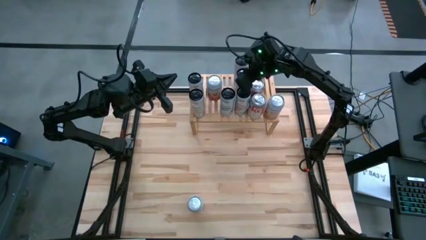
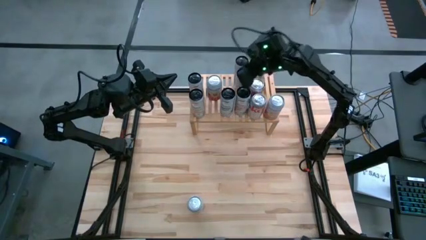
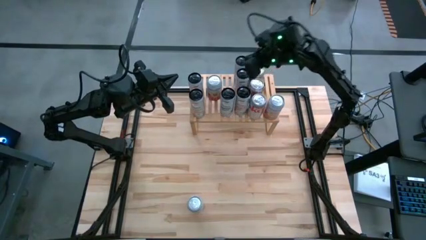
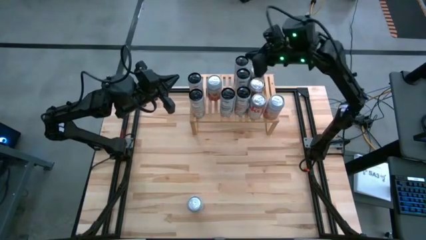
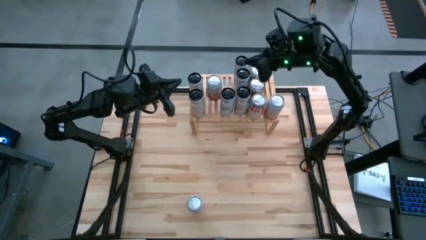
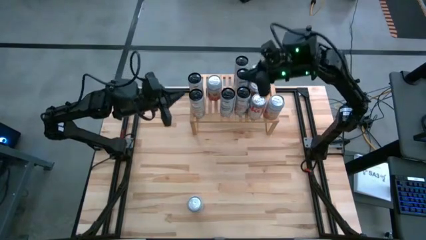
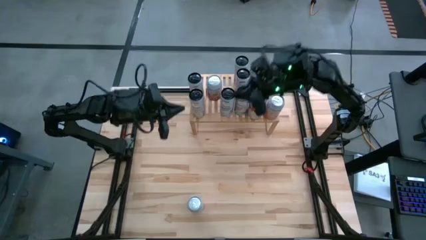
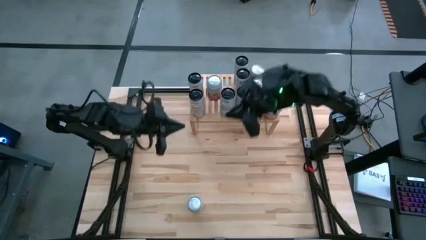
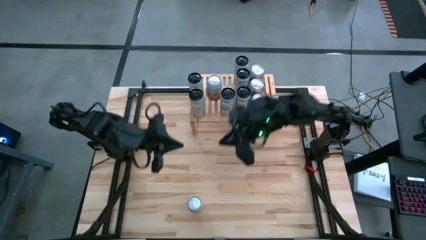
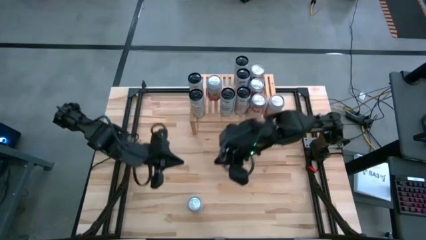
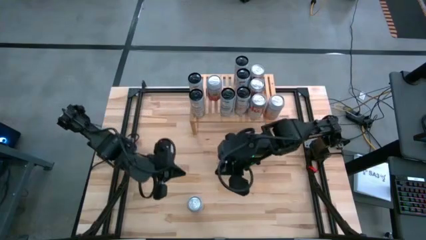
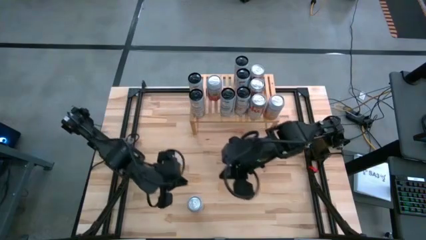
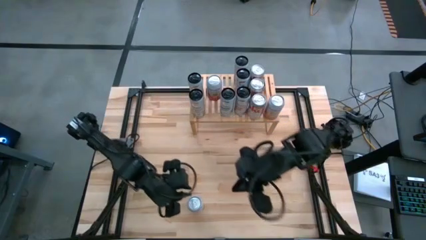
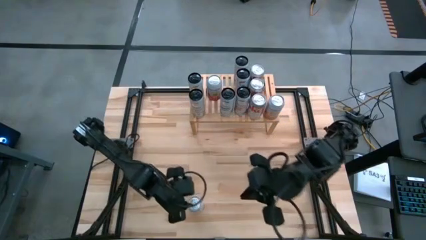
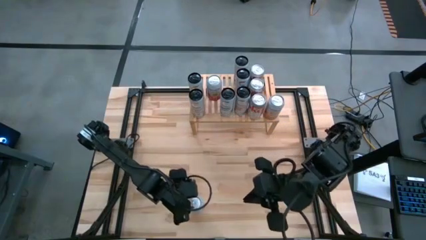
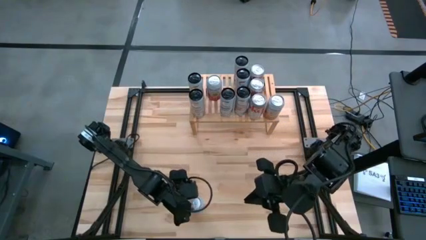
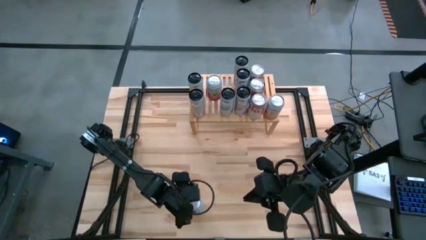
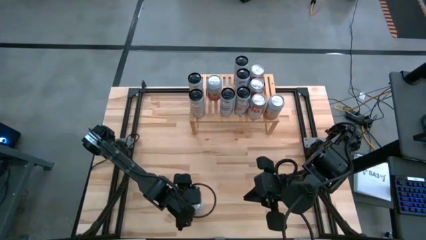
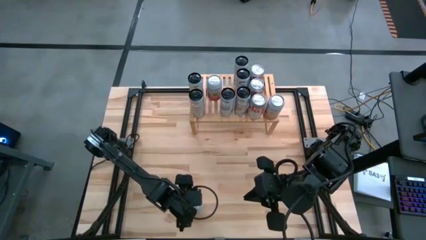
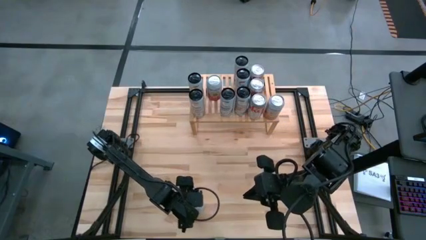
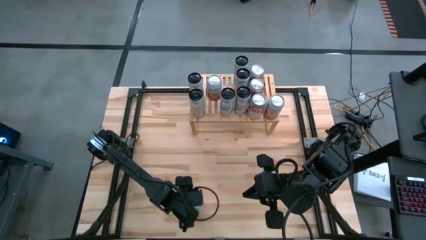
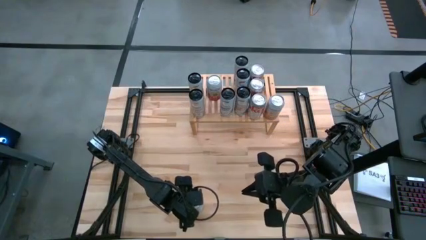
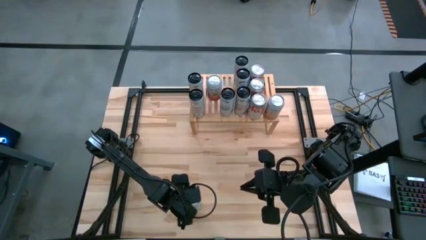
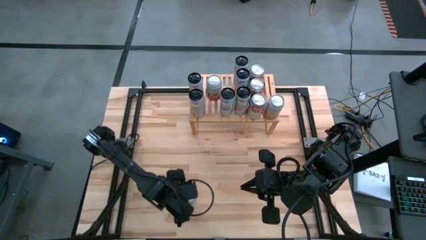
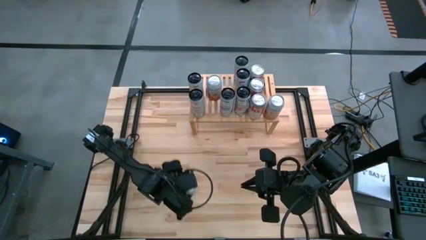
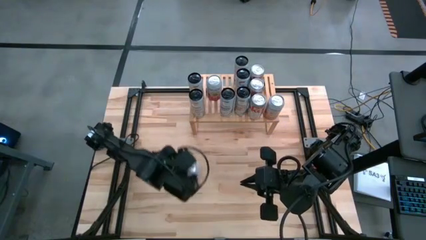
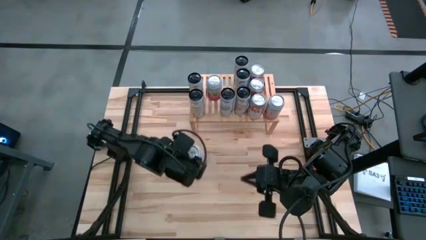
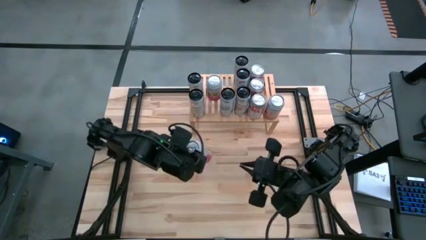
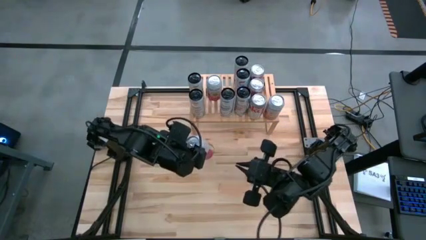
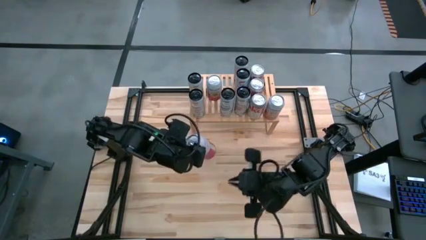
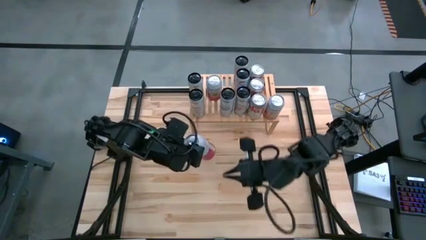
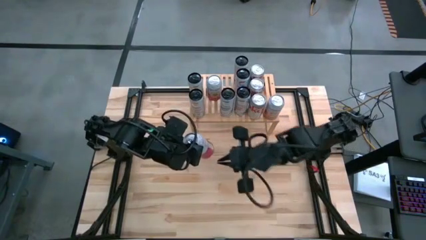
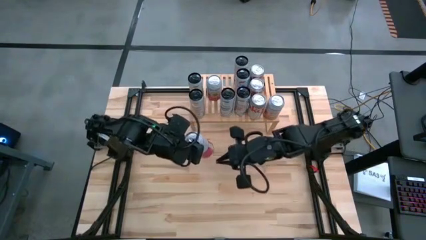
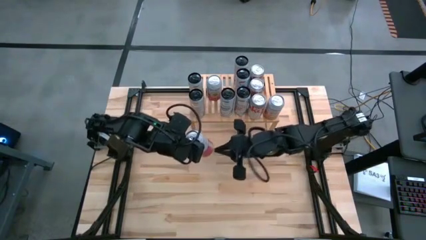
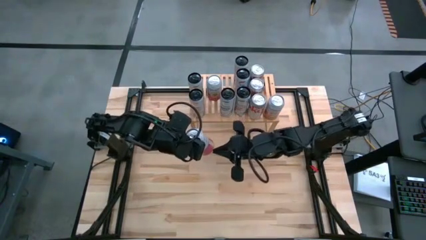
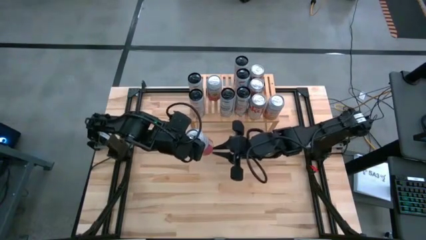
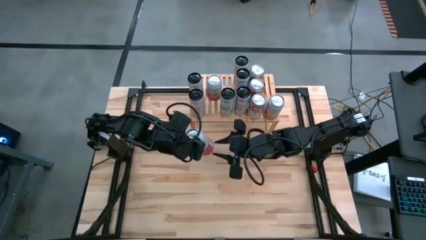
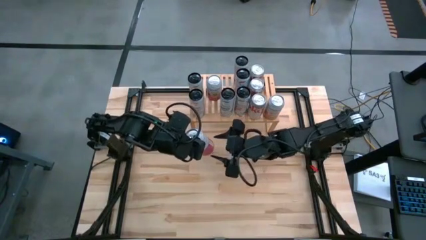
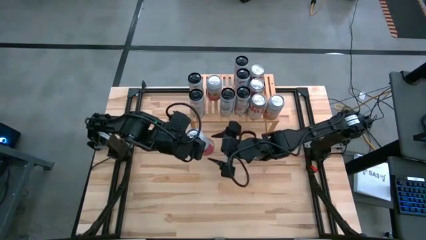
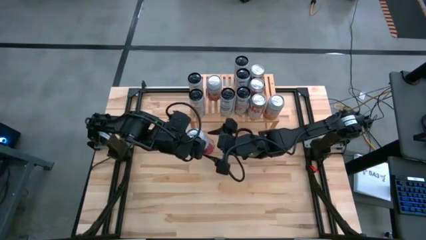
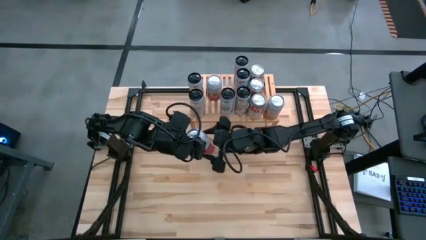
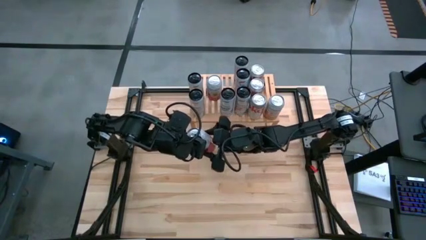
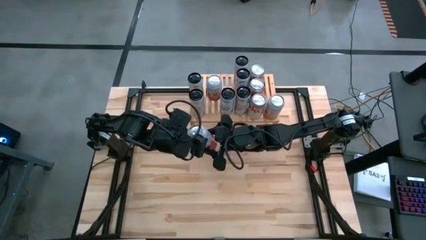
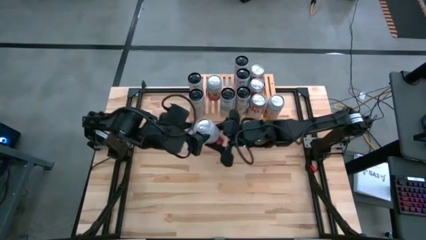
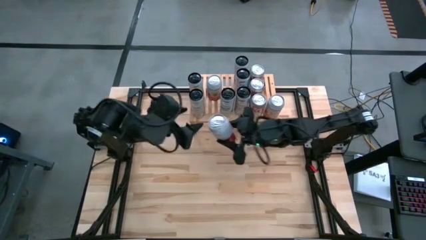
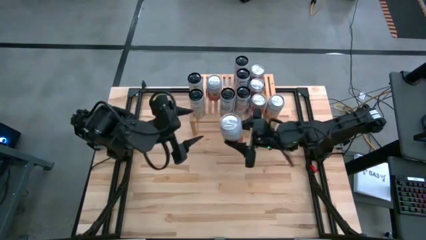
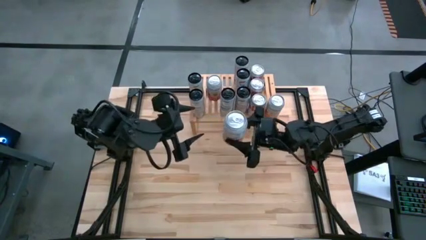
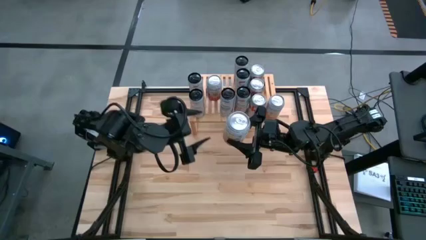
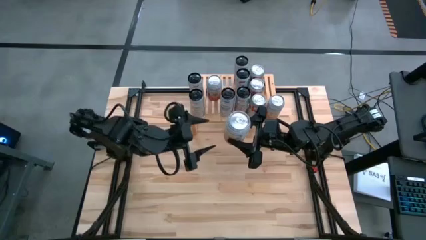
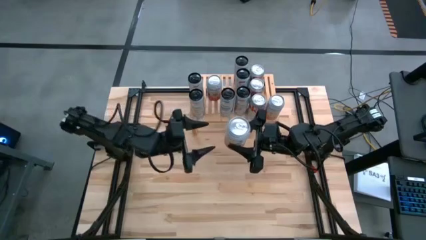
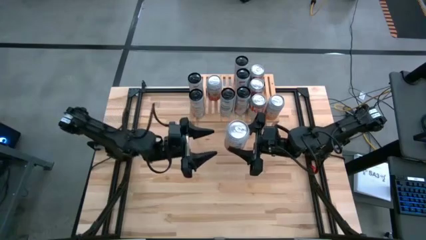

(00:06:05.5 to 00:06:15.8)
Task: Place canned beverage on shelf
Put the pink and white soda can on the shelf aligned with the other pink and white soda cans

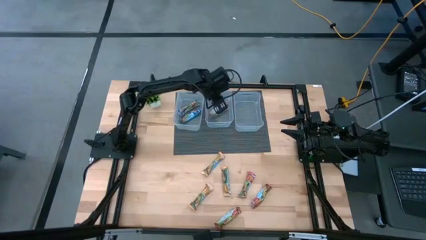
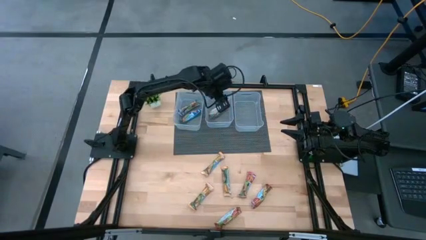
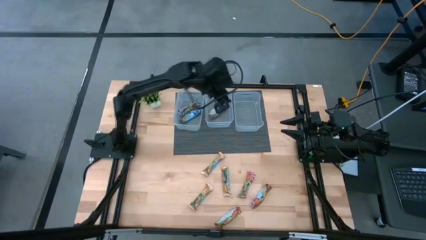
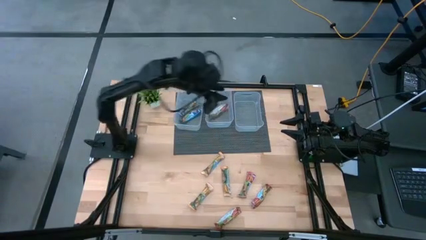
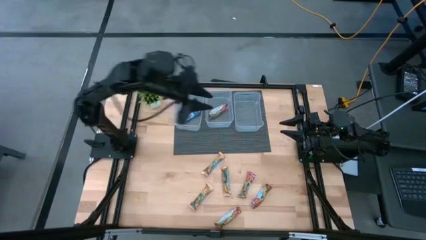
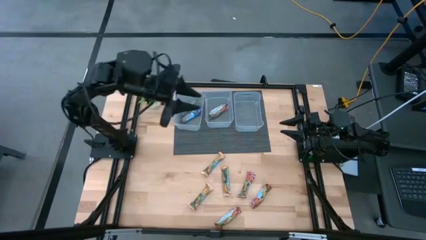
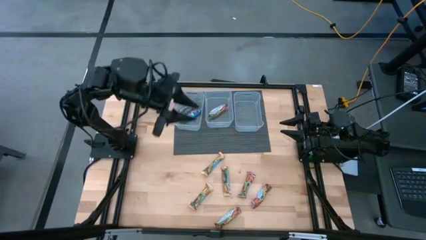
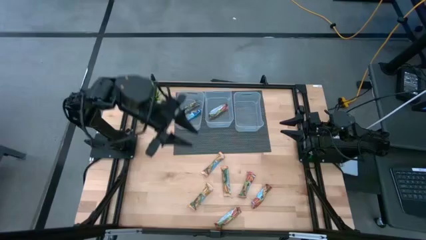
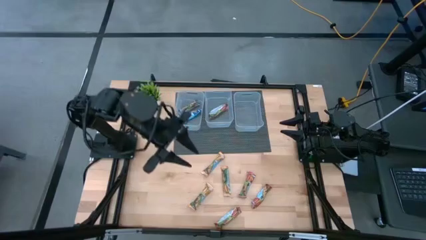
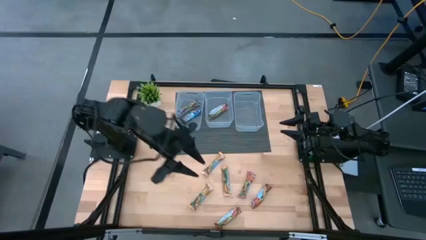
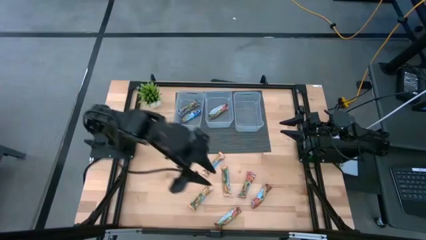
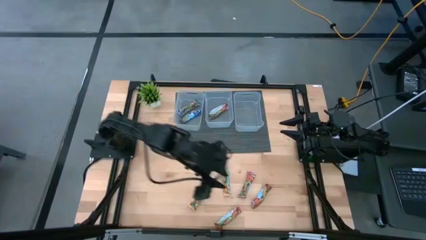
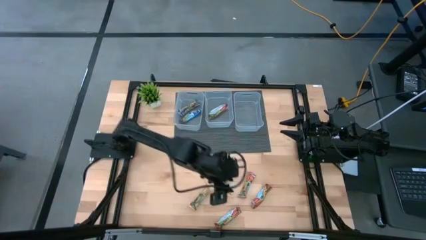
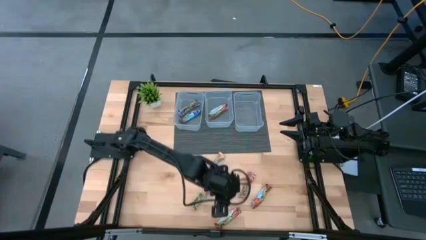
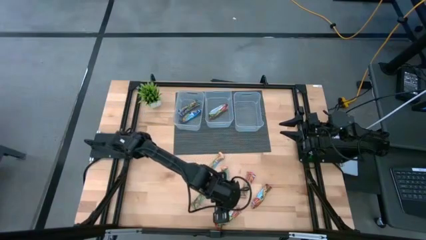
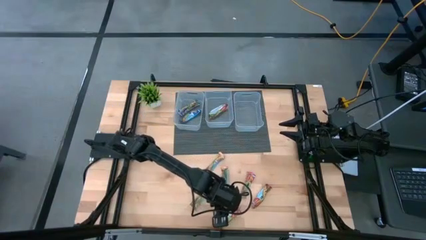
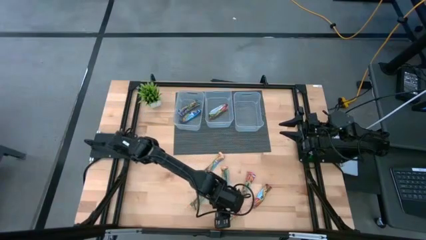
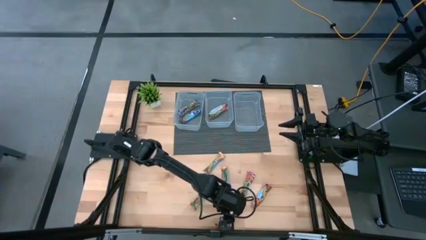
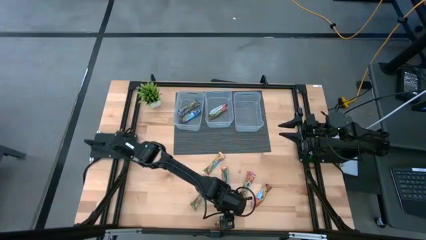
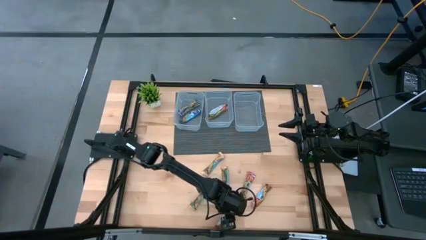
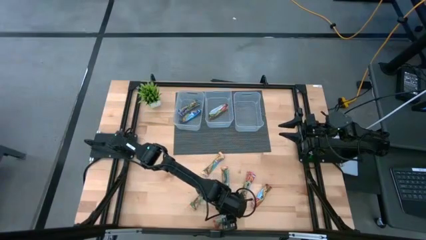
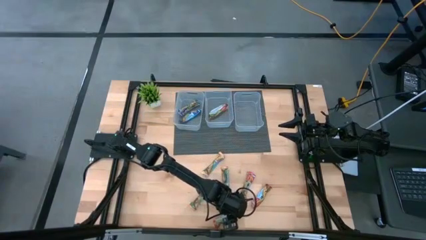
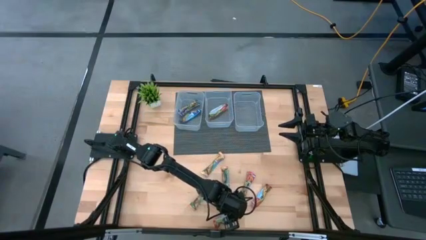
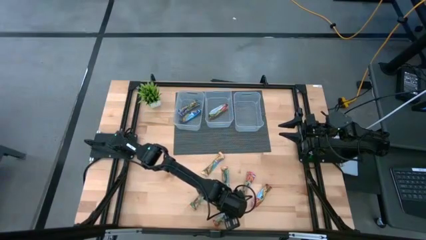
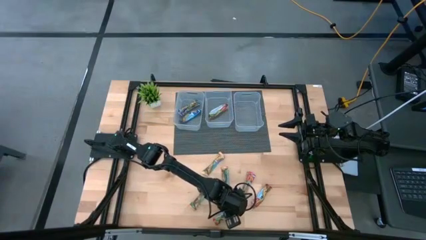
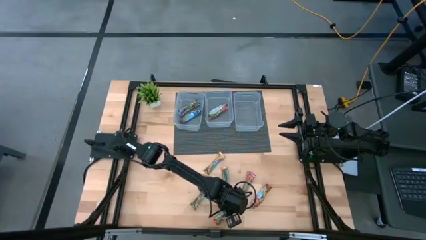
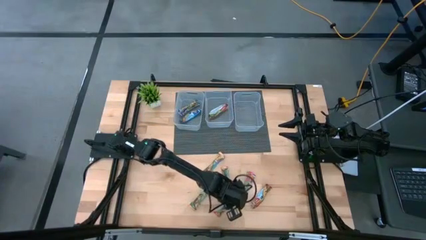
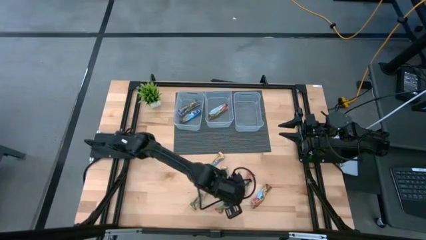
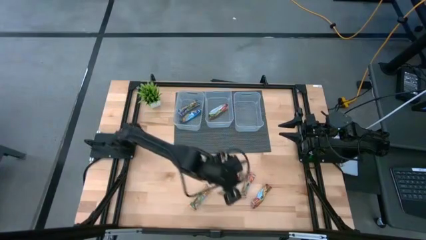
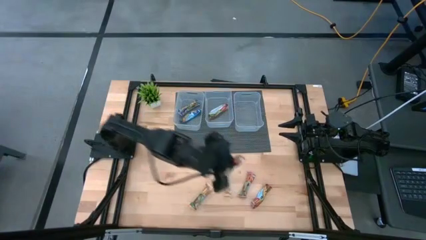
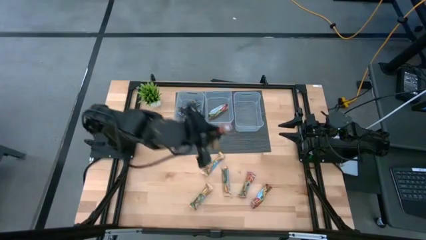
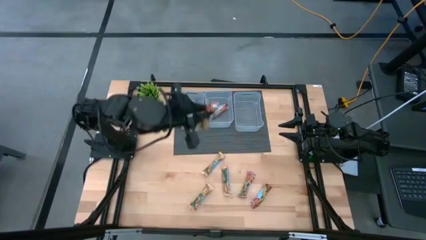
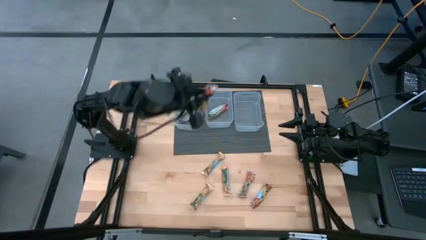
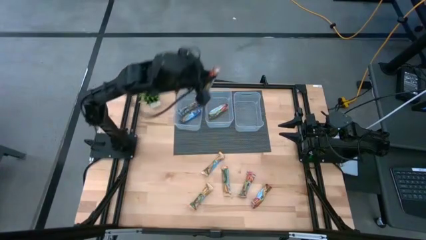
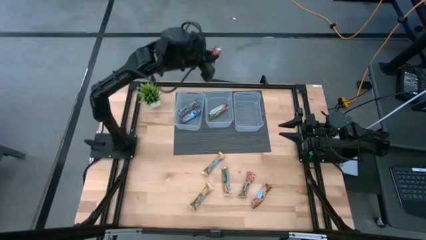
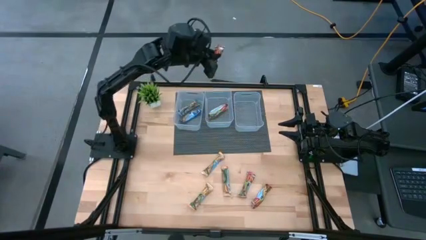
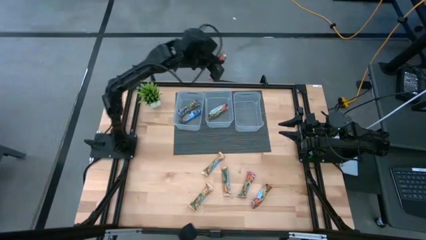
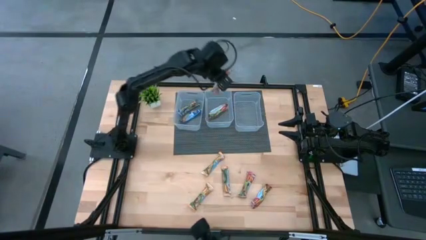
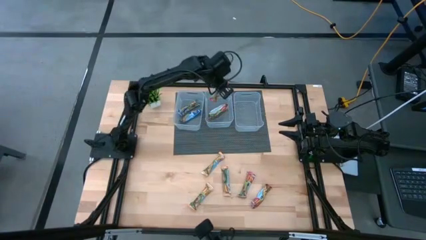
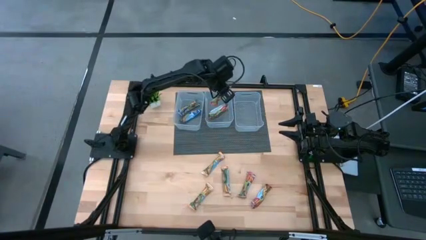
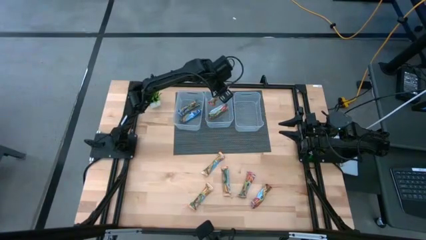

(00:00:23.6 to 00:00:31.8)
Task: Pick and place Granola Bars by type
Put the red granola bar into the middle transparent bin
